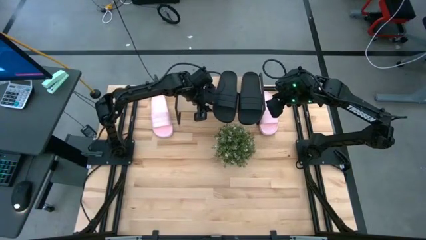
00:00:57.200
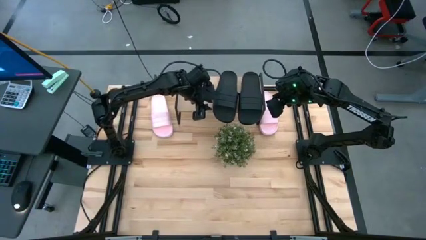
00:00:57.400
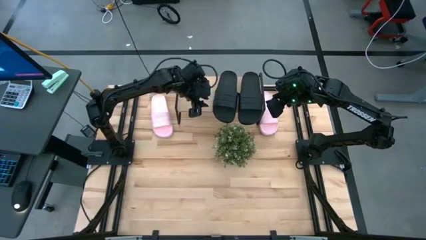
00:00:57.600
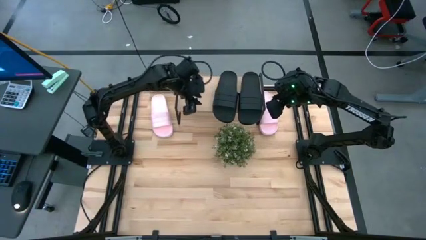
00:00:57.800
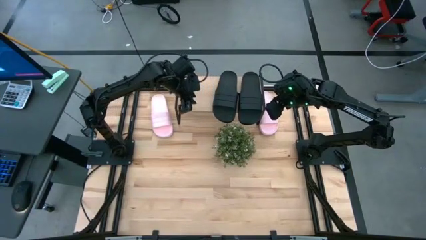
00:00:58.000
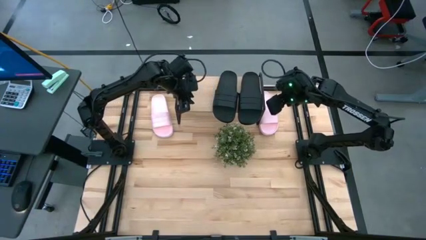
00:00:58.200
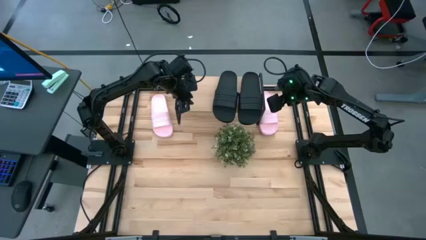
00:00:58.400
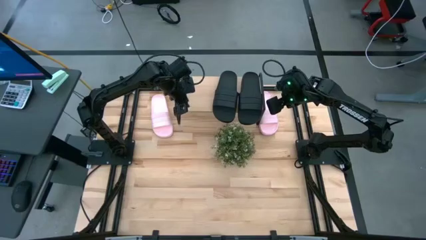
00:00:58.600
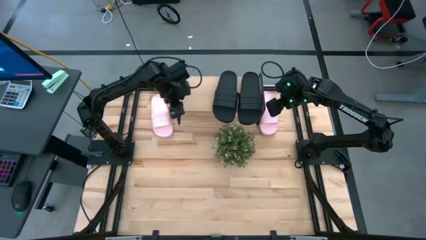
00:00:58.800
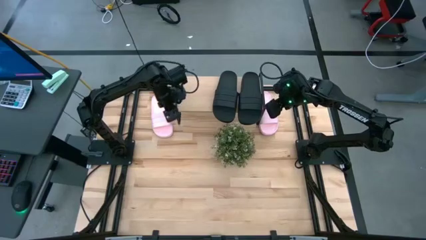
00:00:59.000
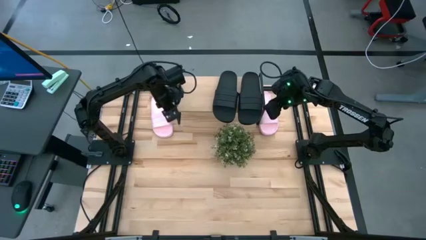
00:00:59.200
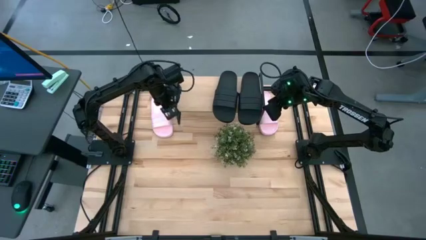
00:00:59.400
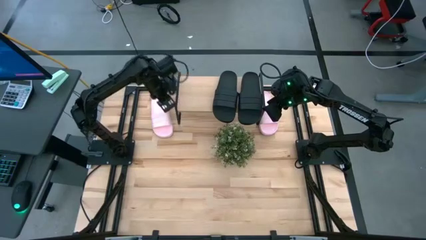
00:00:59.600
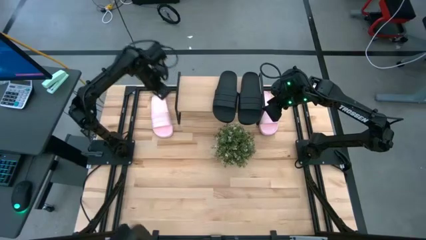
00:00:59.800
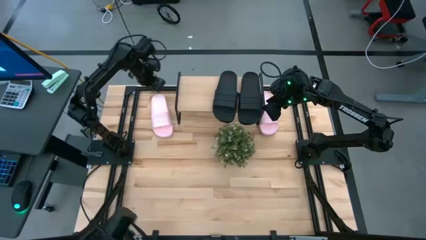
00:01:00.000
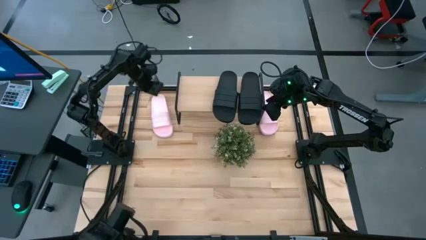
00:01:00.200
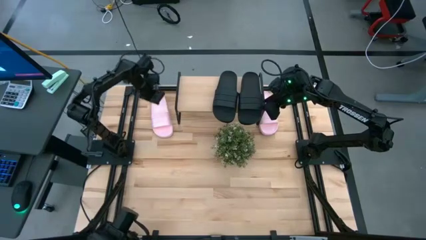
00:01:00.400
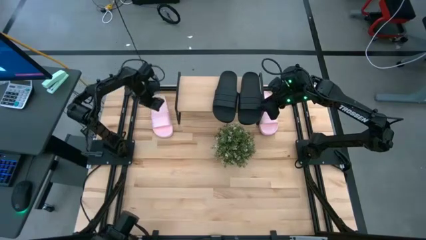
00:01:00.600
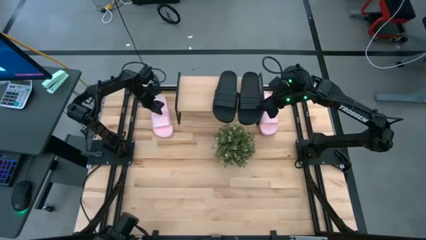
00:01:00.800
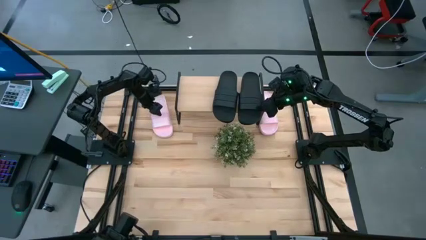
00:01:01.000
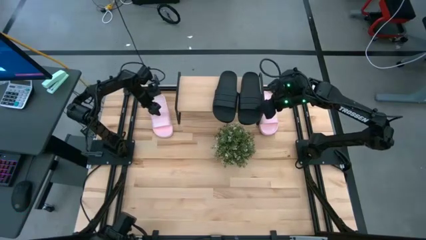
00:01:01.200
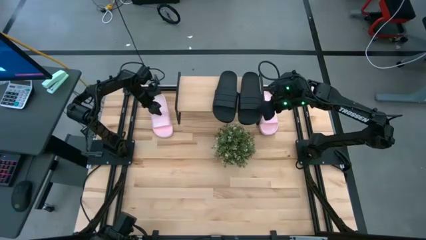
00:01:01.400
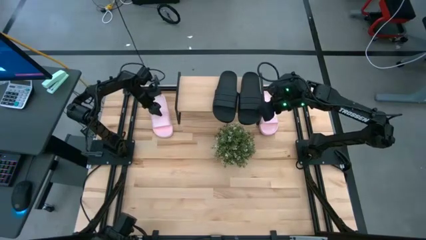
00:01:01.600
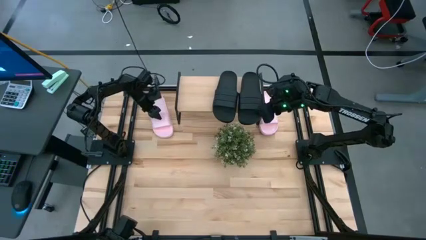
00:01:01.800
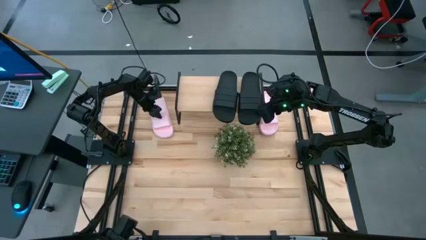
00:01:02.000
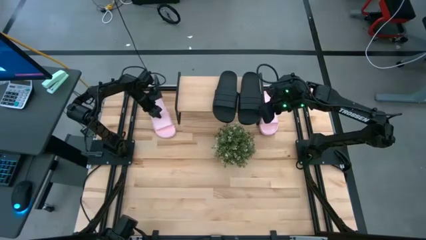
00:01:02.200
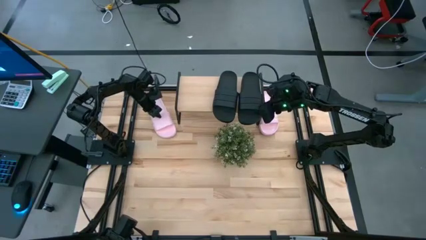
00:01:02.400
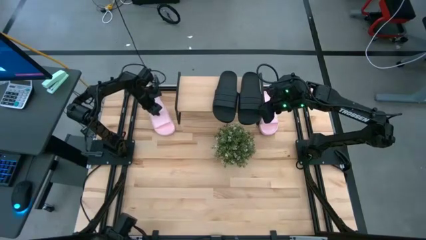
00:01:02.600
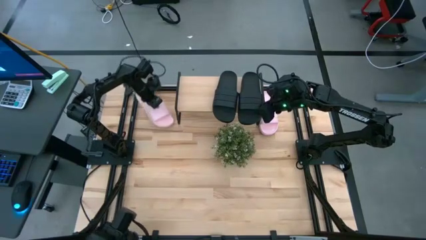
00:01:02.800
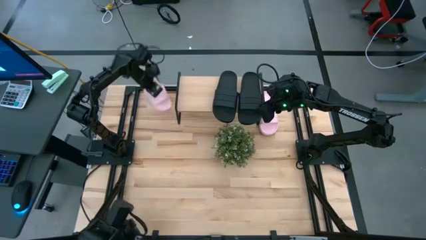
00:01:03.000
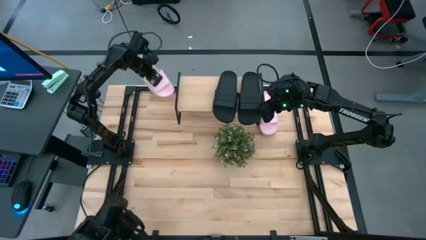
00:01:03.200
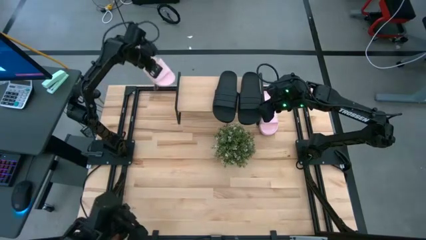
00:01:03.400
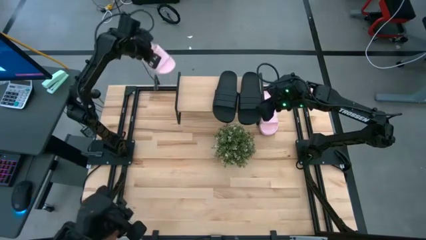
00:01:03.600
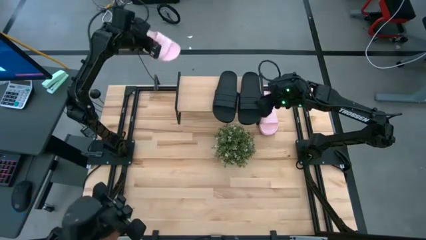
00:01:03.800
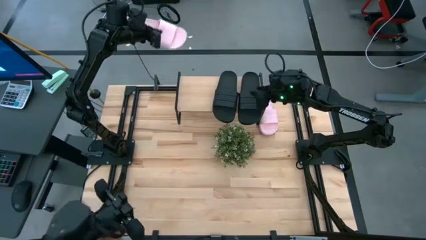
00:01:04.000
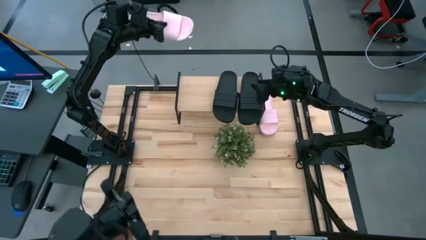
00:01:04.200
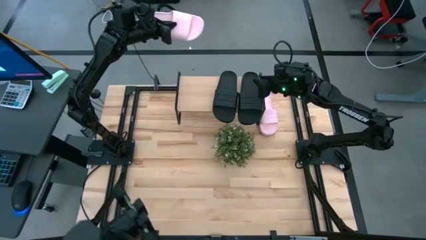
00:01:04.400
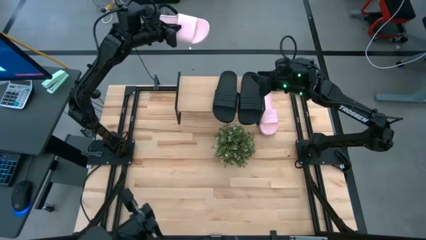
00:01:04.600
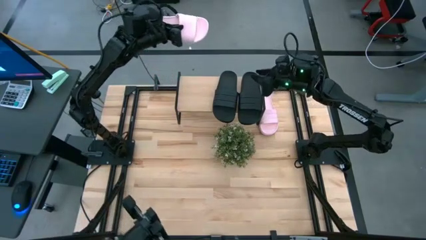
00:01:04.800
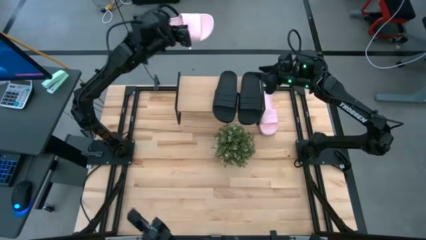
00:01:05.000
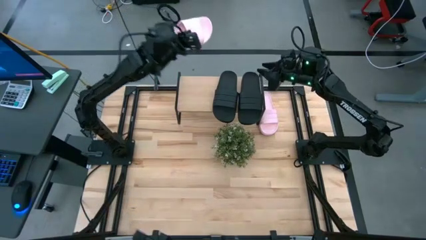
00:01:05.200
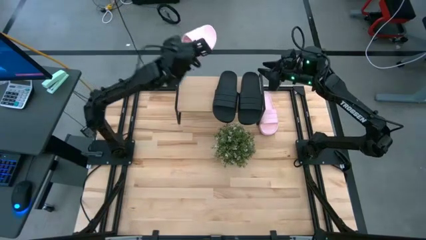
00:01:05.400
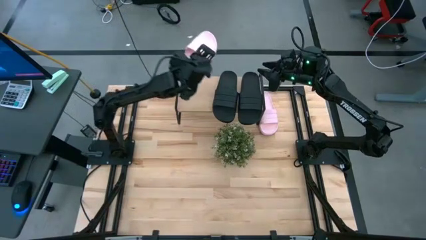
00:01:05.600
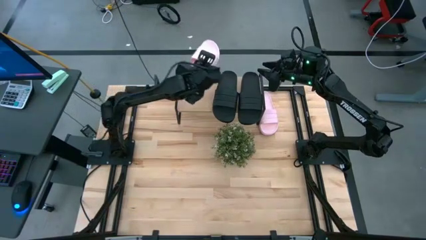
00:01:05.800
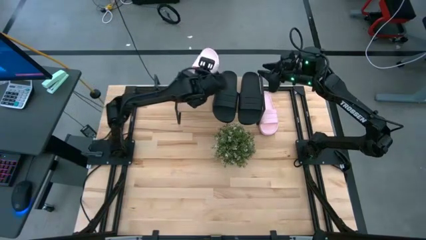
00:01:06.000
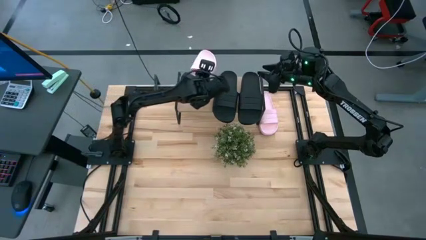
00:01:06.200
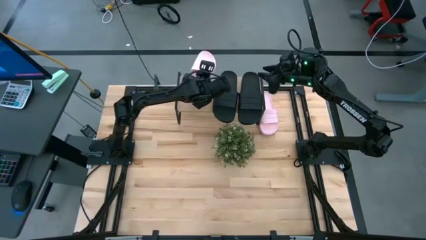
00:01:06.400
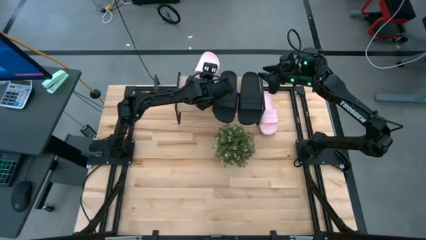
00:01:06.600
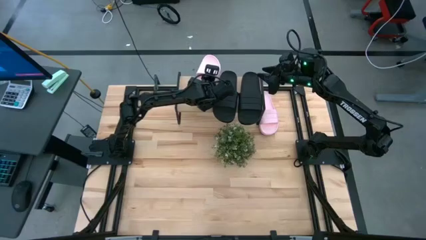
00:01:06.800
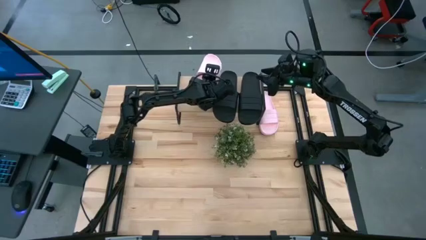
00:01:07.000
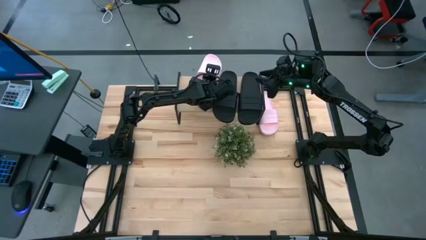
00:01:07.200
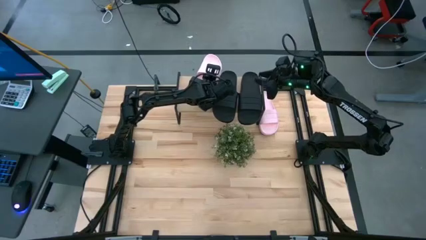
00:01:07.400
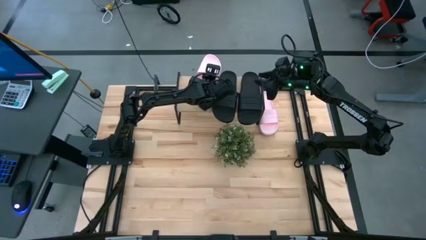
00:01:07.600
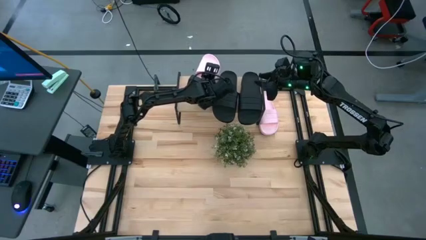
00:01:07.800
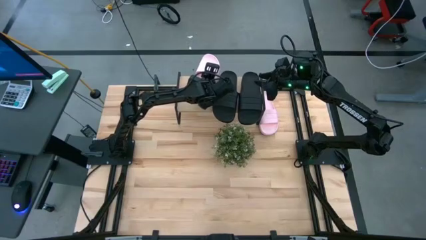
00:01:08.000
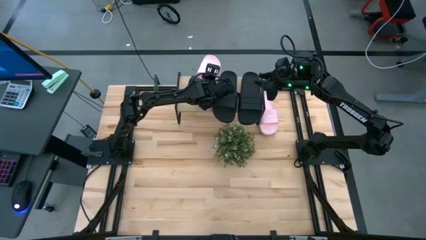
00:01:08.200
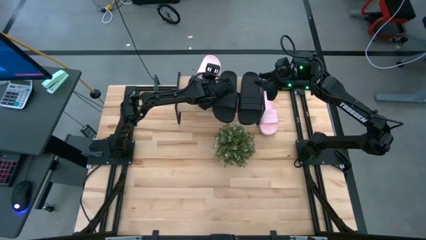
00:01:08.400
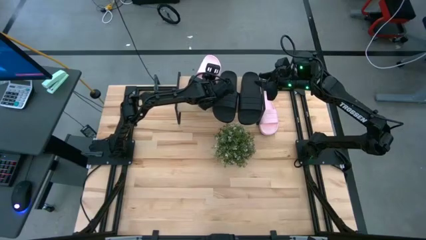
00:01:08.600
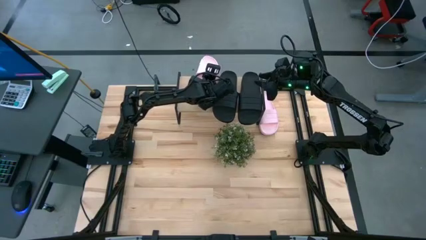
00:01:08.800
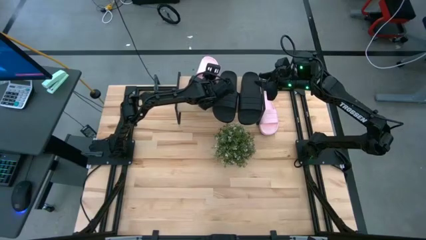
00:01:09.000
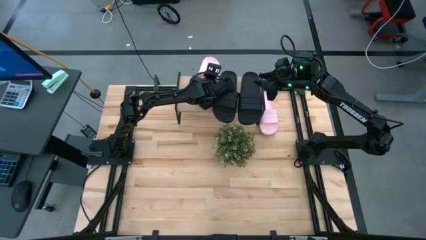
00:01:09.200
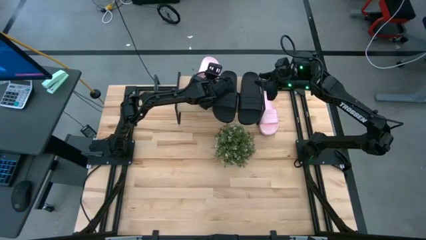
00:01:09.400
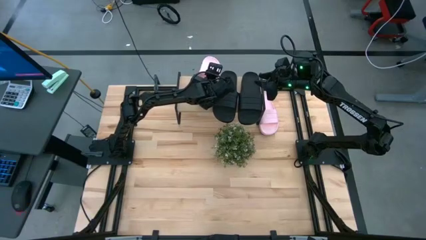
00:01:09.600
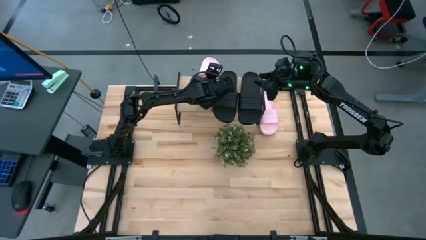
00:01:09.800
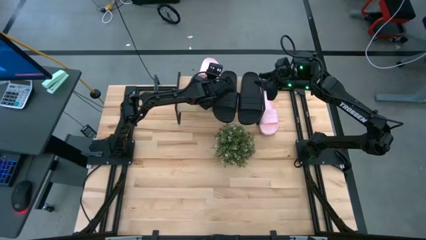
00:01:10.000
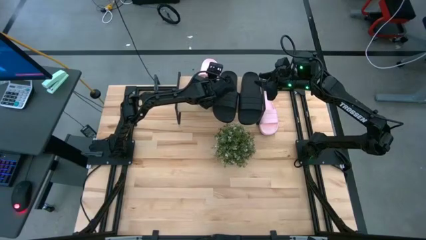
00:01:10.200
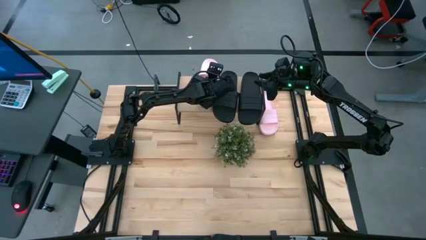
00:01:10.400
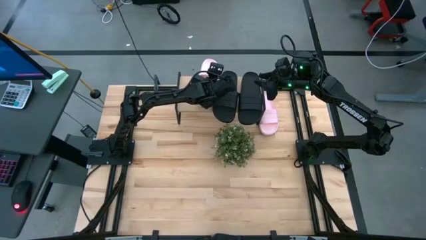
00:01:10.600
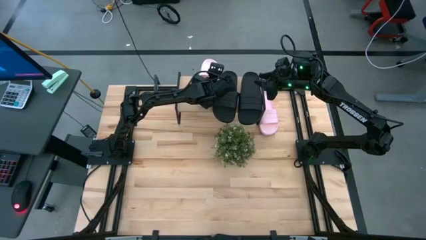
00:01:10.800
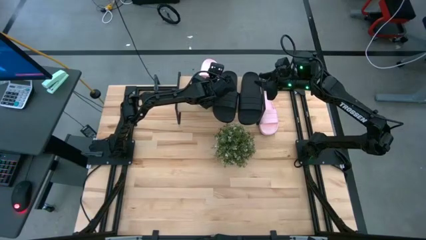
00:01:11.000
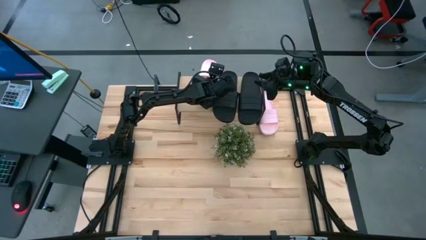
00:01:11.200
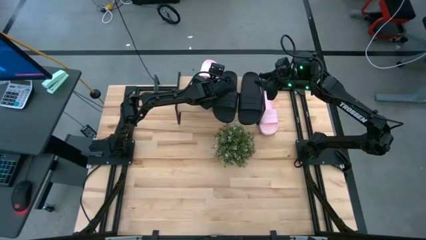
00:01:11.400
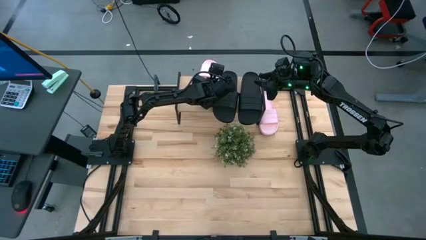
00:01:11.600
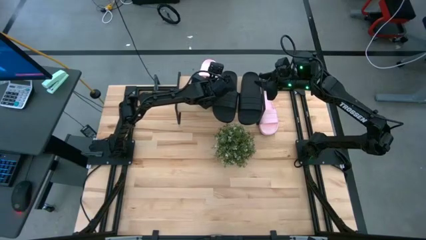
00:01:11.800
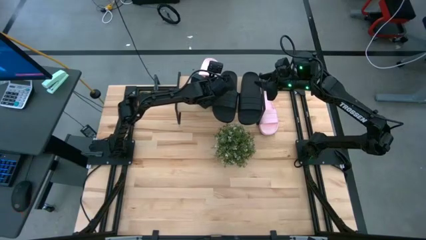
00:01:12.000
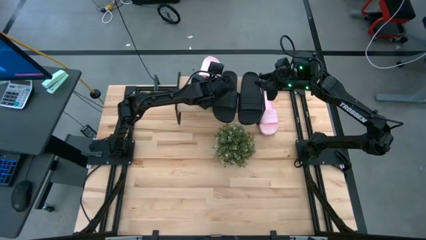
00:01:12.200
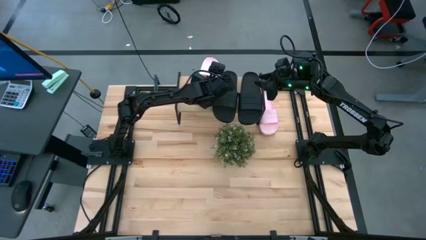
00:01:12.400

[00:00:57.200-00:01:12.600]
Task: Pick and place slides into the shelf
Put the left pink slipper on the shelf
